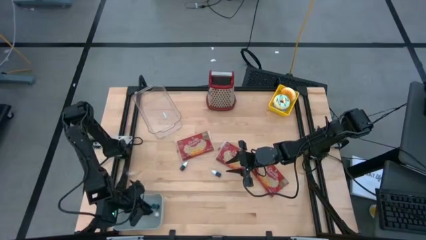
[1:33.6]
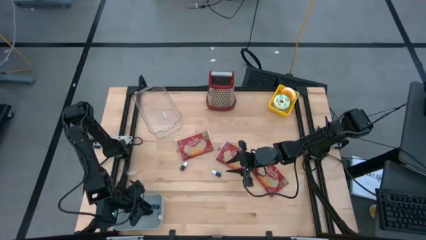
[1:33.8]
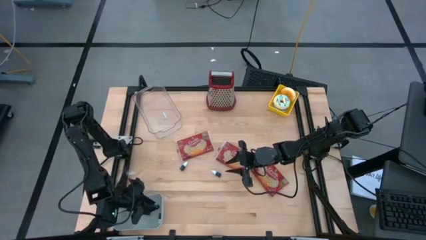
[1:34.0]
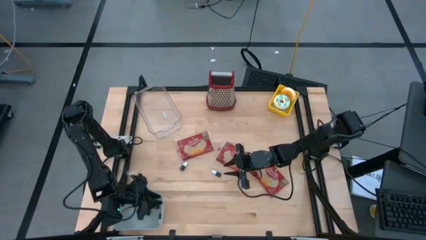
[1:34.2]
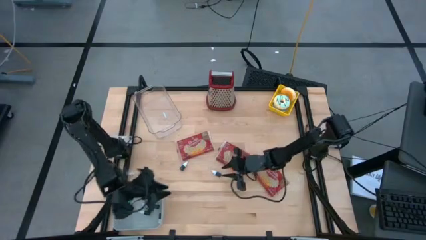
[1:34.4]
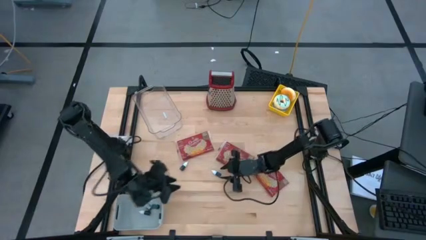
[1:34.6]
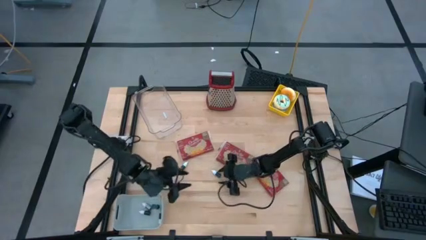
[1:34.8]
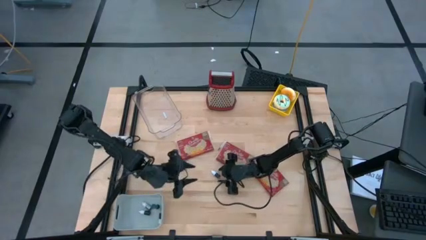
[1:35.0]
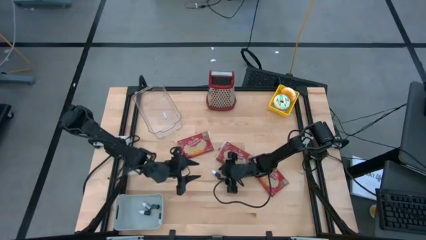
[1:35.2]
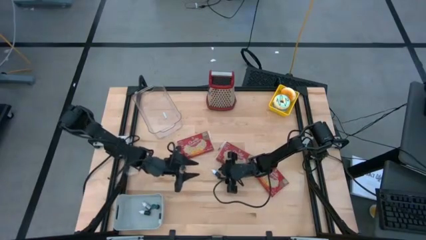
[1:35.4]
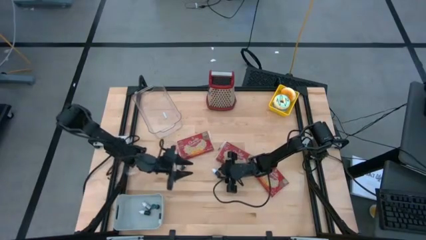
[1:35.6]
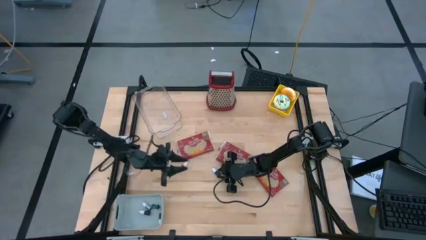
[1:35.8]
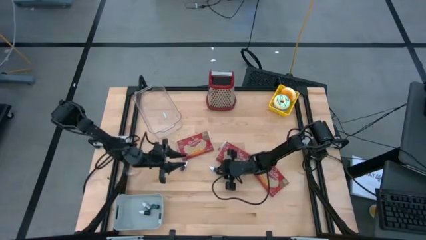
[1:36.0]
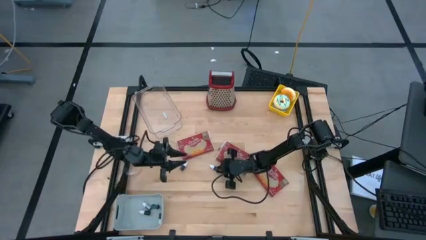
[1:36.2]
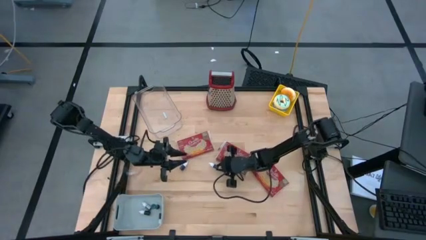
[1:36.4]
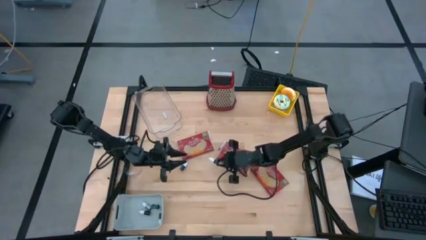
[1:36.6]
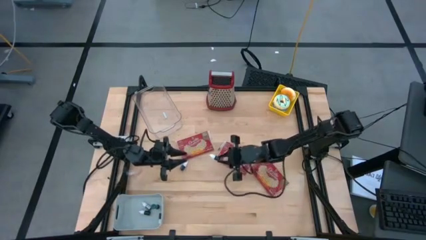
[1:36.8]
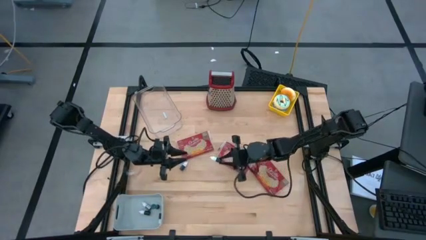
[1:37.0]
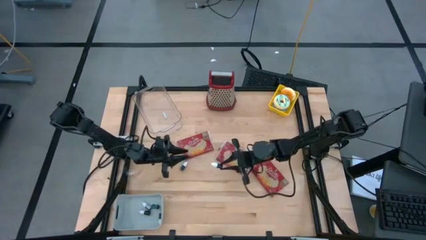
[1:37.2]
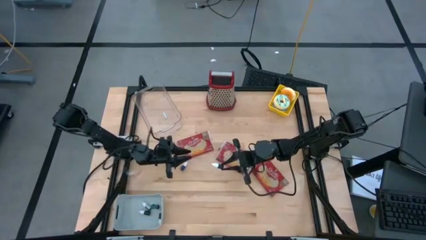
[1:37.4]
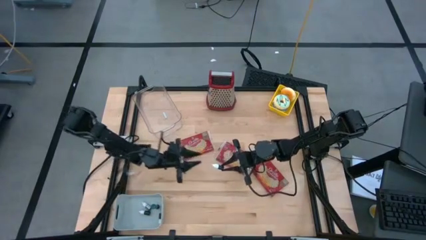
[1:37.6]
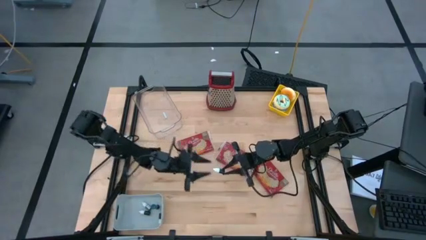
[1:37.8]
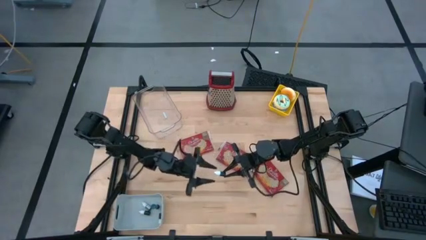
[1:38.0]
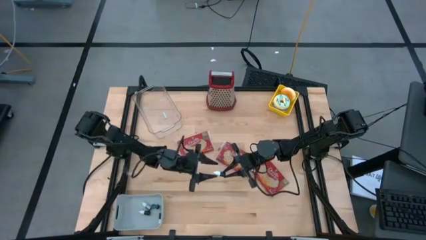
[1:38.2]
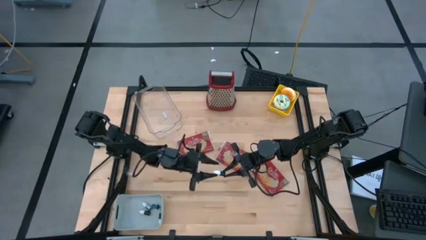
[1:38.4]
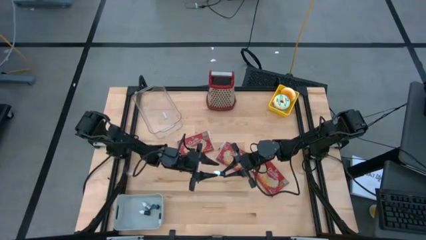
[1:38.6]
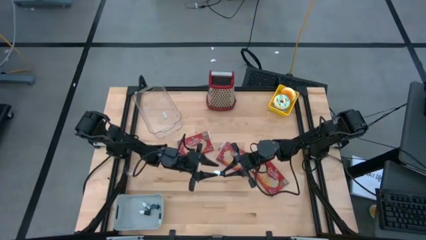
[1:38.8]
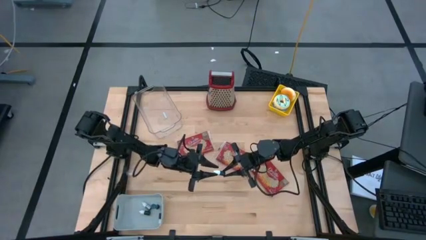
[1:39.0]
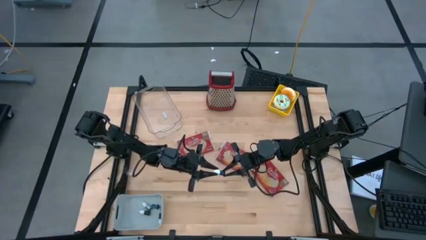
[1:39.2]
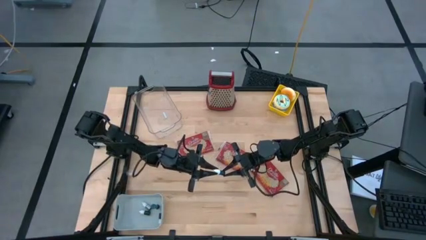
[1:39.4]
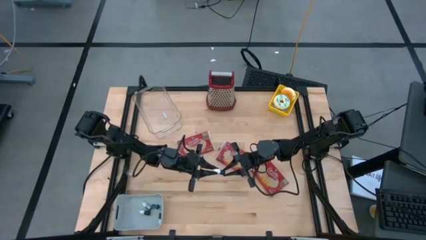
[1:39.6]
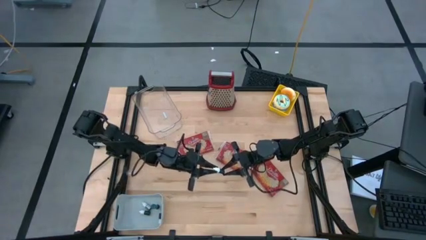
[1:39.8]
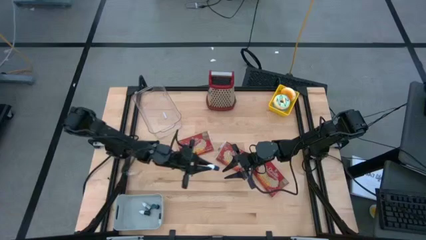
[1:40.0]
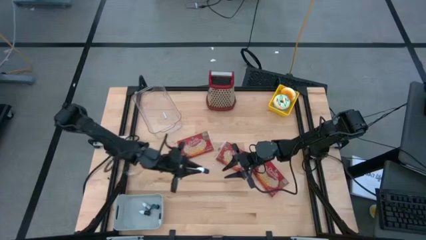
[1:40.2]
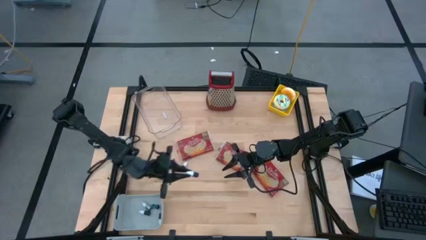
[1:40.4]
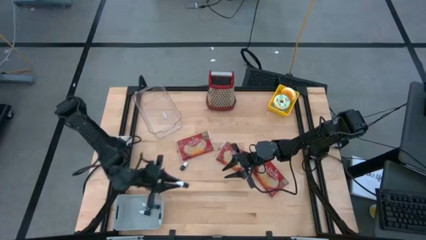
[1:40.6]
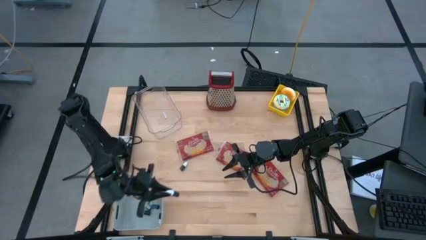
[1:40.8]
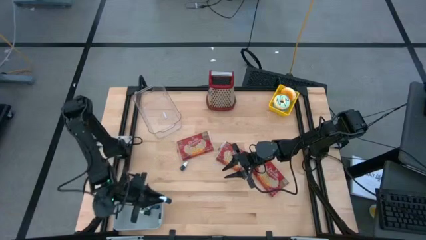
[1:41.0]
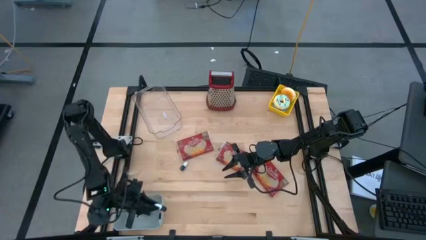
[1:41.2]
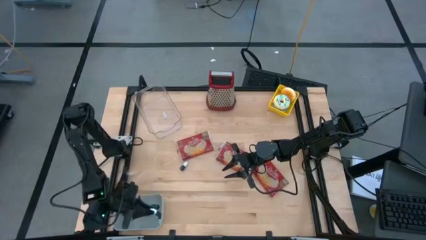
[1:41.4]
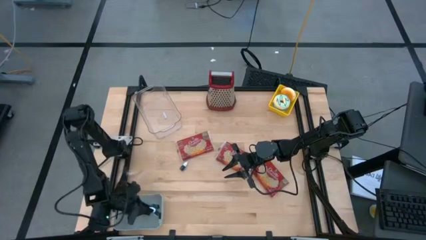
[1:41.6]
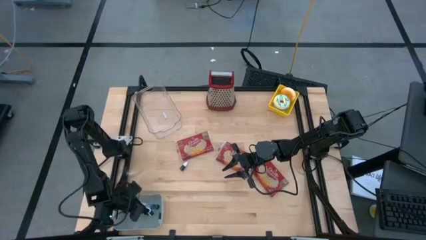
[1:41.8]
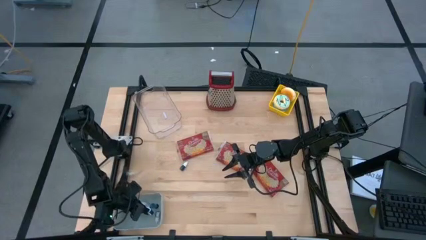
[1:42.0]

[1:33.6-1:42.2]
Put the blue food coloring bottle into the gray bin

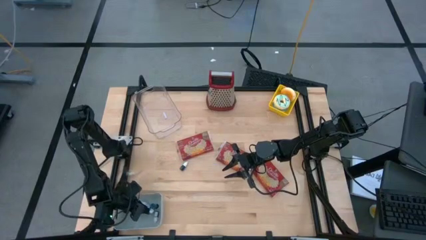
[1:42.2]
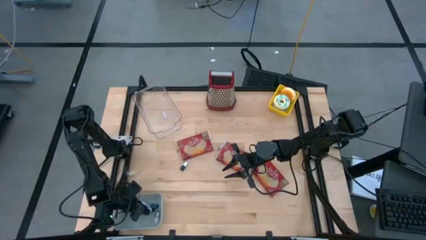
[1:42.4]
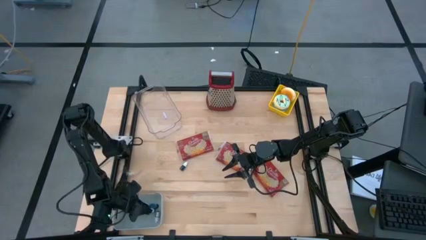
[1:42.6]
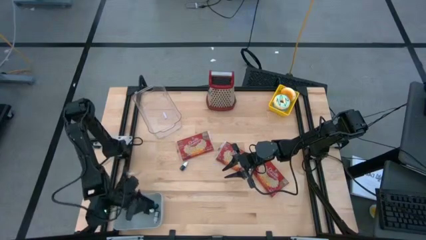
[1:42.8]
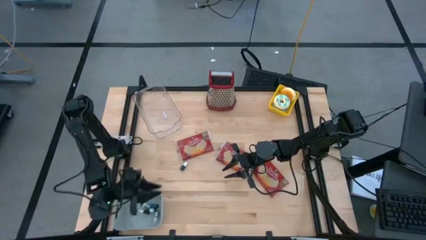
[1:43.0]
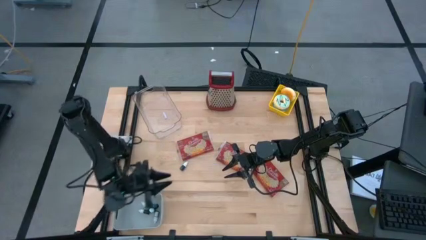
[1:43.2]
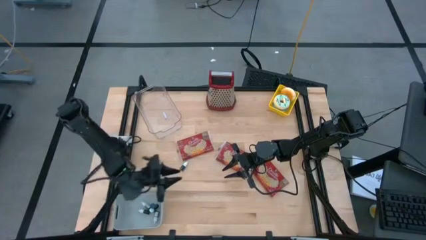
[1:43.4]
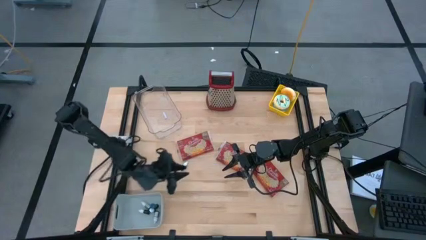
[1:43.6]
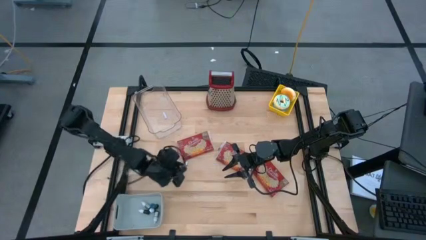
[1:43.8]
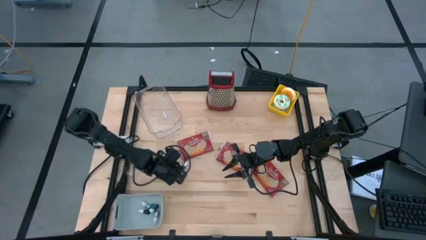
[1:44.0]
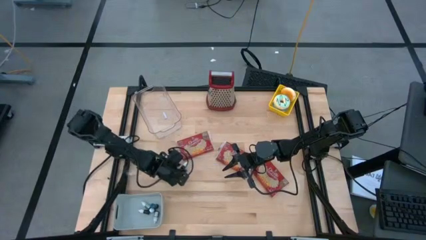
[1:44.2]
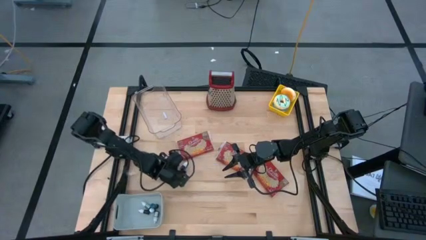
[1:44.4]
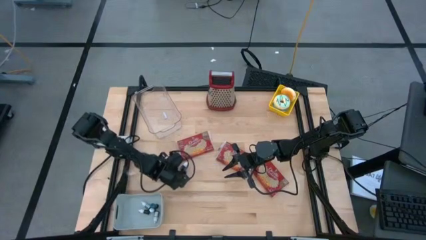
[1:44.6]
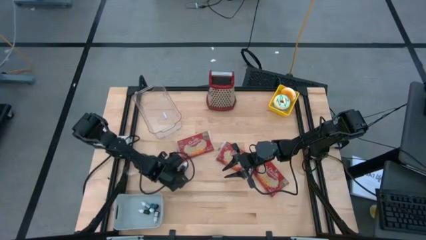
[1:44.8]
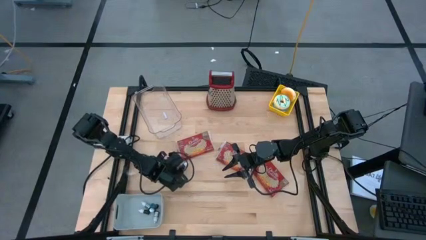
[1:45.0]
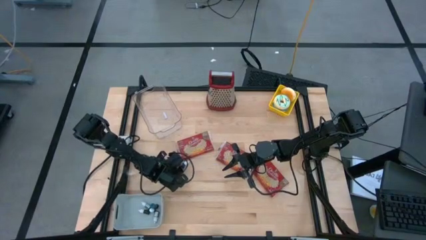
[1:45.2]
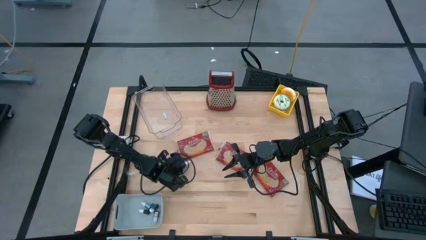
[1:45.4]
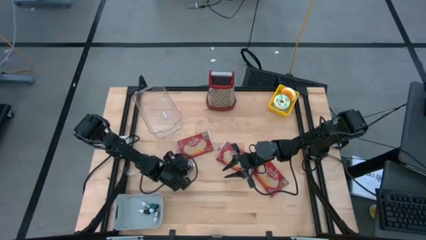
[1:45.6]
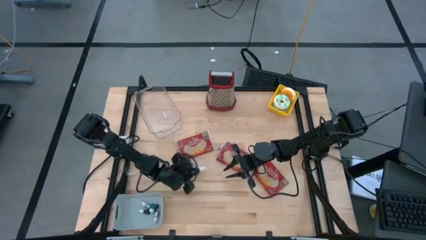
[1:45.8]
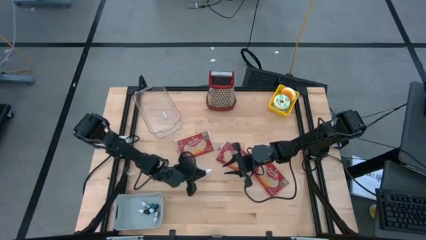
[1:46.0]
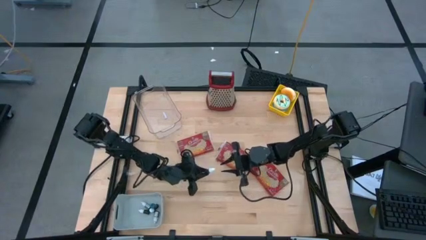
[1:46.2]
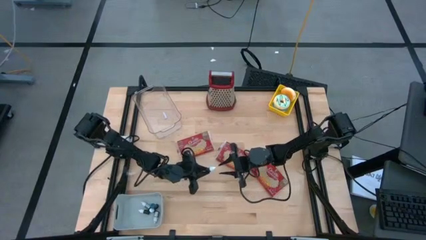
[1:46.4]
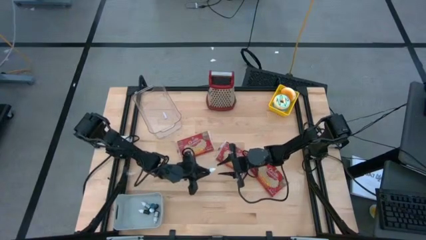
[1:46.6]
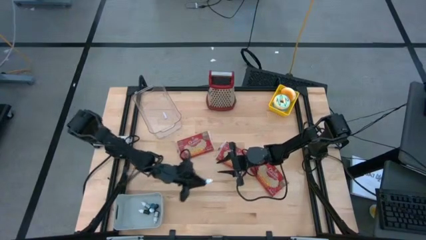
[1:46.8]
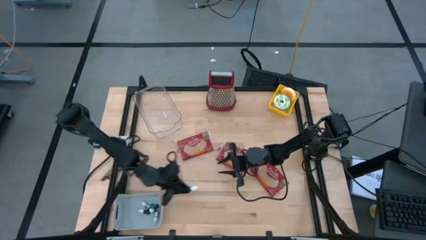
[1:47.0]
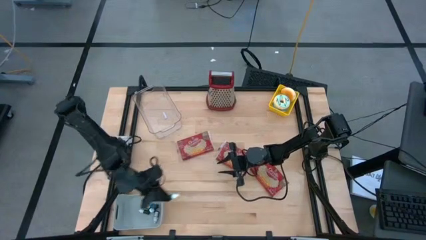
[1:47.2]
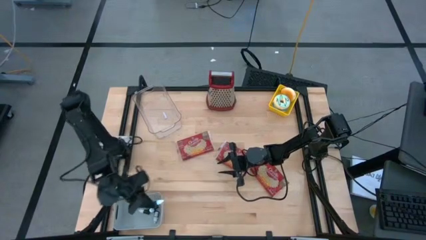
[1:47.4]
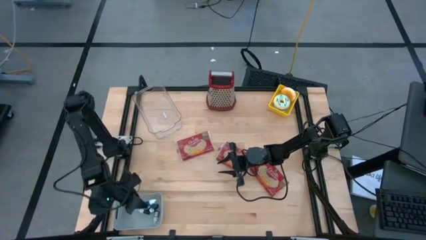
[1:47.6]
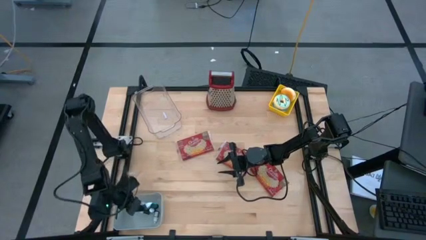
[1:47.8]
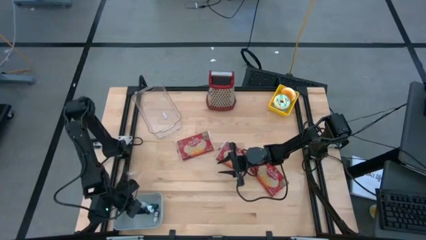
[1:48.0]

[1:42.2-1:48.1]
Put the black food coloring bottle into the gray bin
